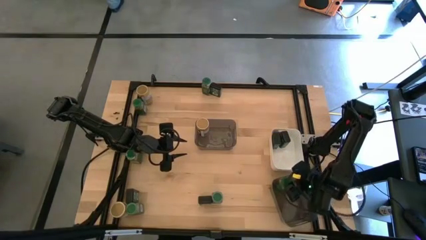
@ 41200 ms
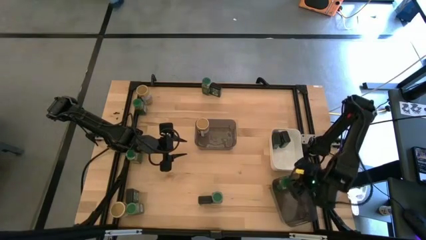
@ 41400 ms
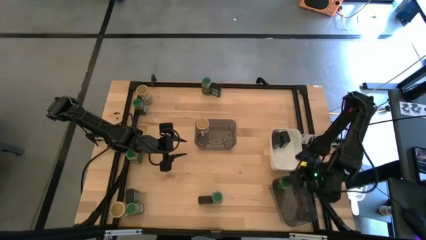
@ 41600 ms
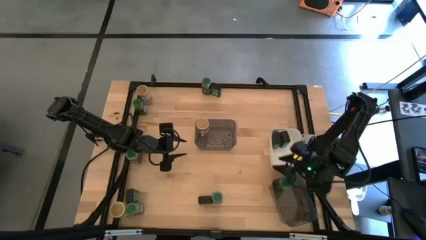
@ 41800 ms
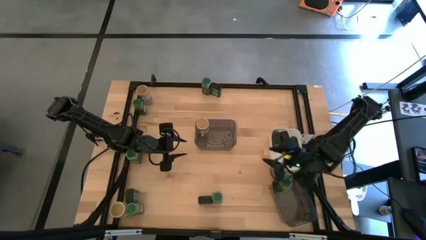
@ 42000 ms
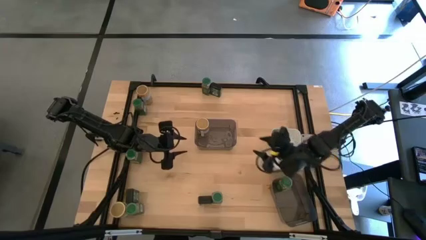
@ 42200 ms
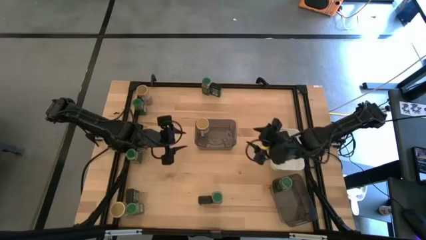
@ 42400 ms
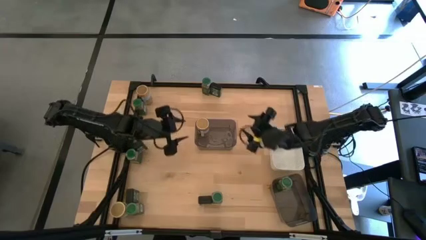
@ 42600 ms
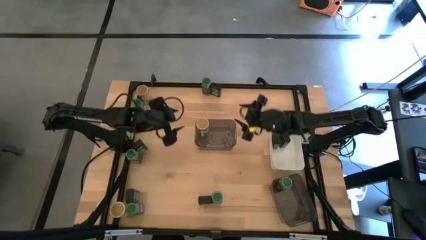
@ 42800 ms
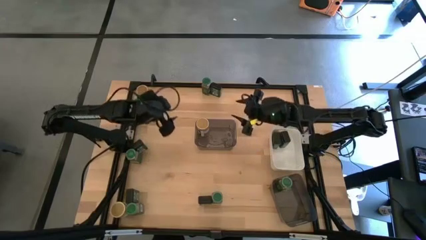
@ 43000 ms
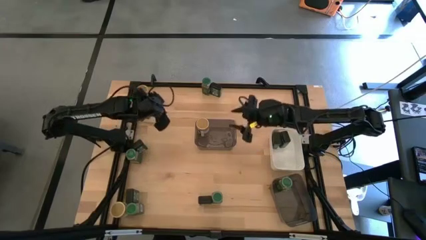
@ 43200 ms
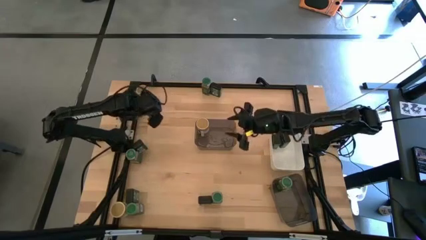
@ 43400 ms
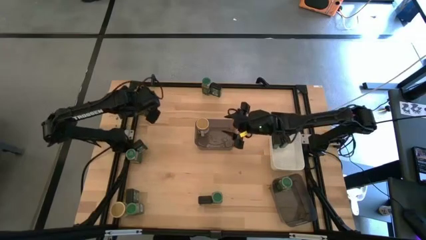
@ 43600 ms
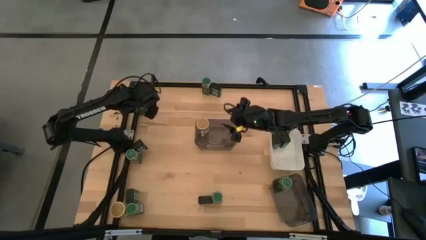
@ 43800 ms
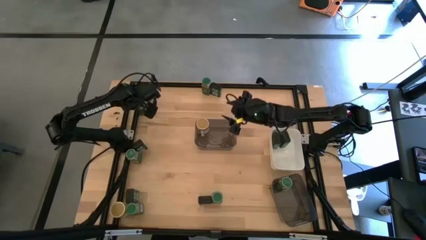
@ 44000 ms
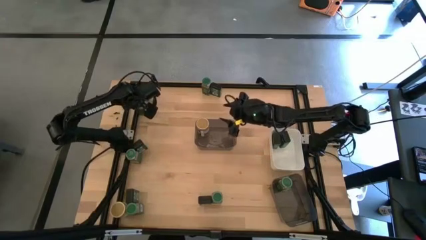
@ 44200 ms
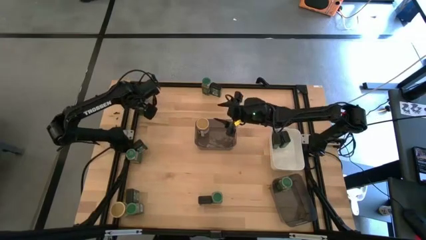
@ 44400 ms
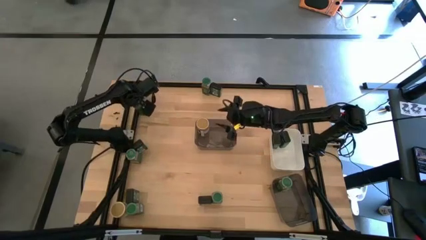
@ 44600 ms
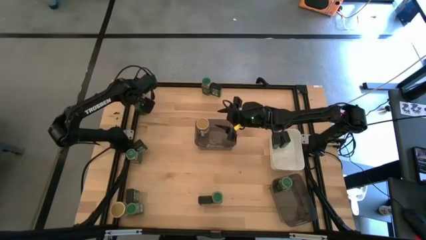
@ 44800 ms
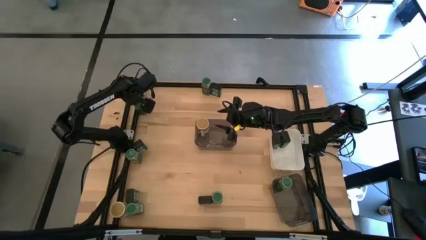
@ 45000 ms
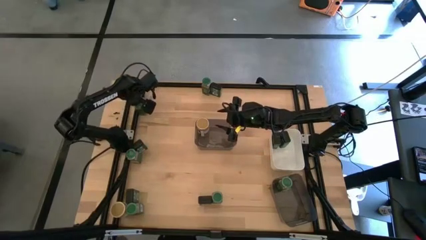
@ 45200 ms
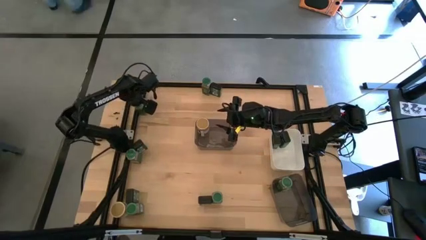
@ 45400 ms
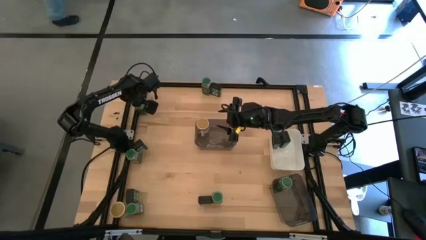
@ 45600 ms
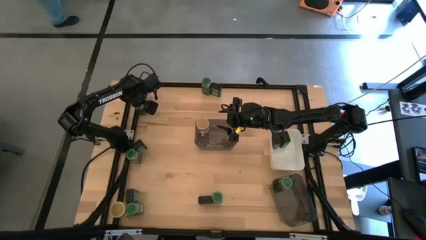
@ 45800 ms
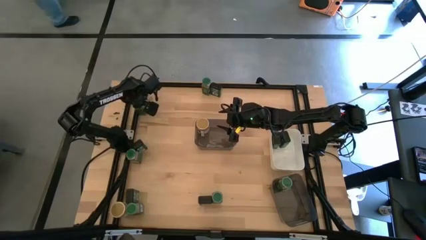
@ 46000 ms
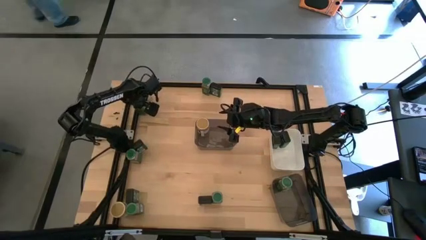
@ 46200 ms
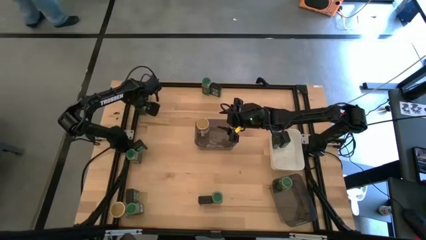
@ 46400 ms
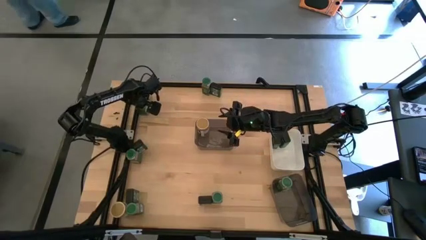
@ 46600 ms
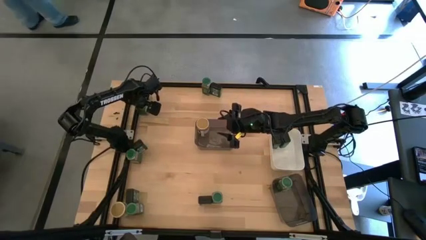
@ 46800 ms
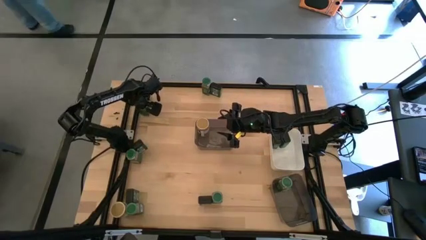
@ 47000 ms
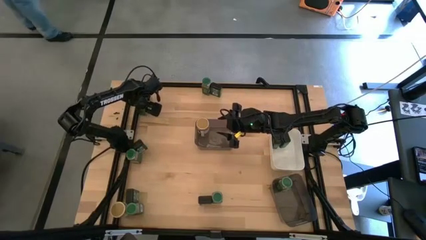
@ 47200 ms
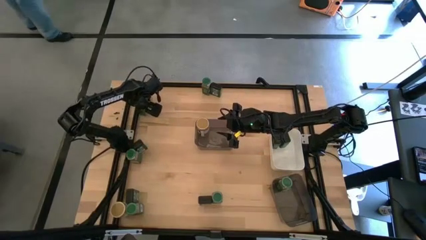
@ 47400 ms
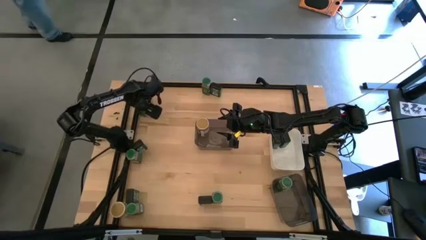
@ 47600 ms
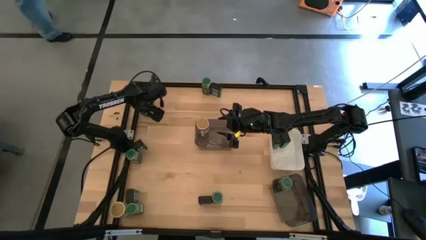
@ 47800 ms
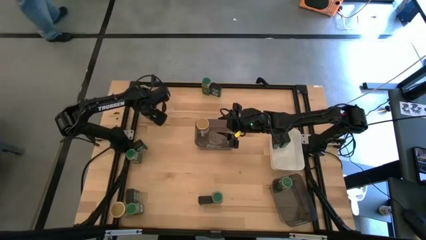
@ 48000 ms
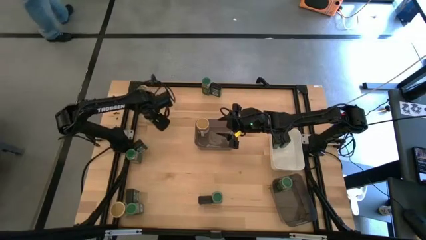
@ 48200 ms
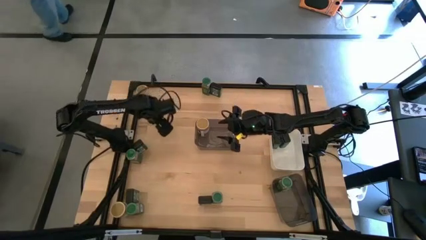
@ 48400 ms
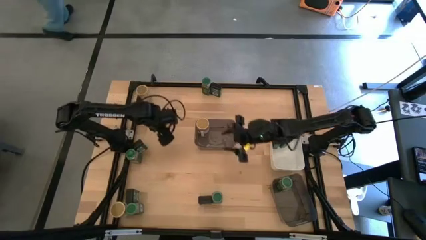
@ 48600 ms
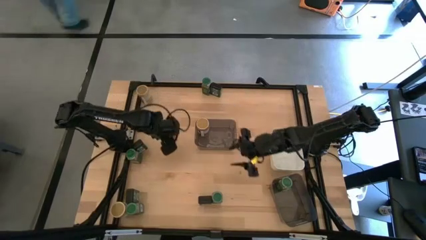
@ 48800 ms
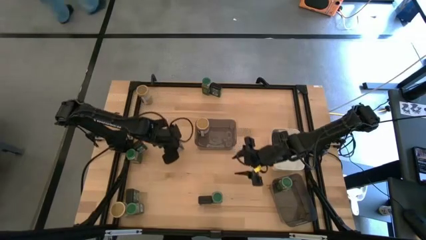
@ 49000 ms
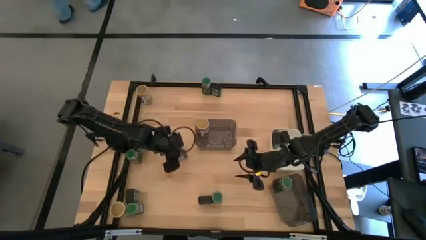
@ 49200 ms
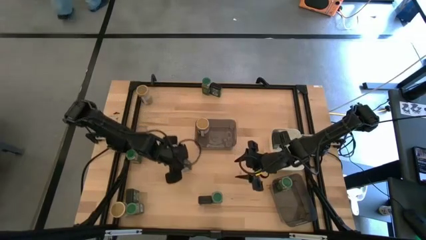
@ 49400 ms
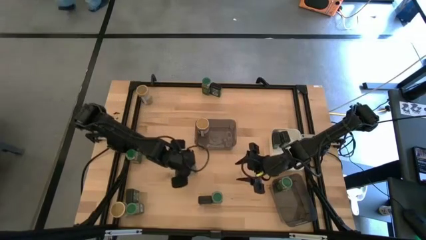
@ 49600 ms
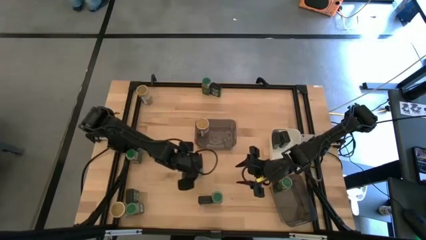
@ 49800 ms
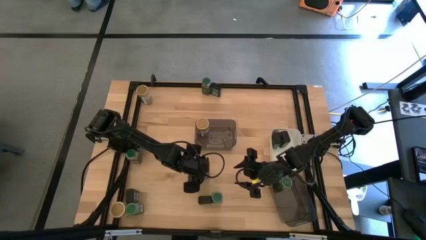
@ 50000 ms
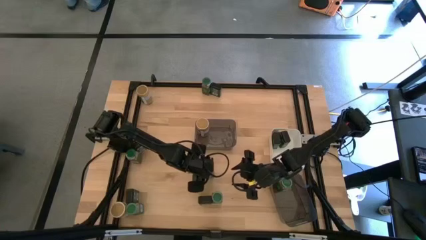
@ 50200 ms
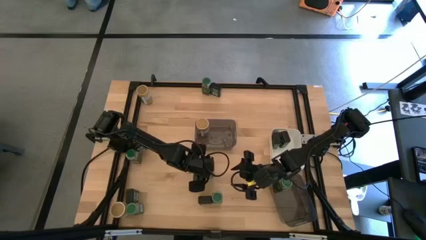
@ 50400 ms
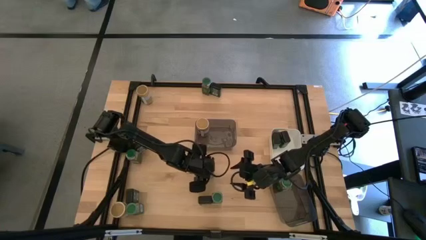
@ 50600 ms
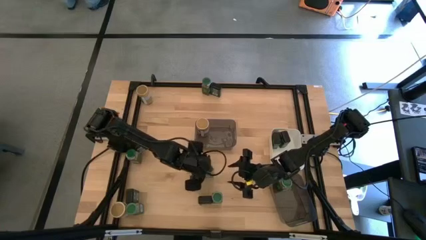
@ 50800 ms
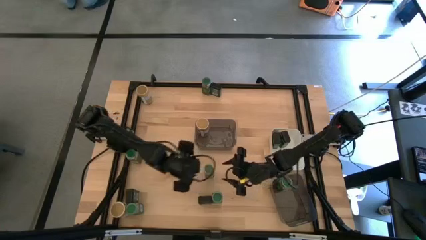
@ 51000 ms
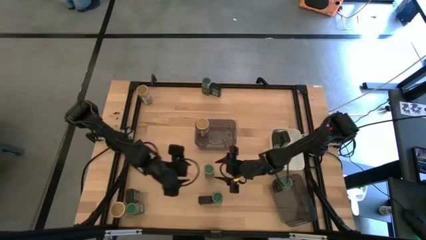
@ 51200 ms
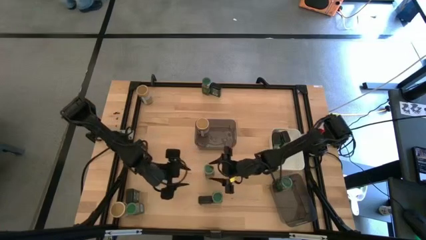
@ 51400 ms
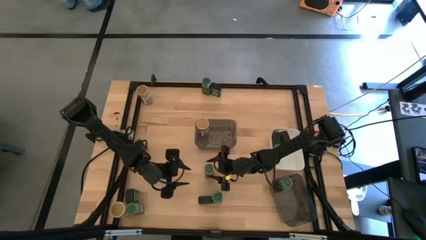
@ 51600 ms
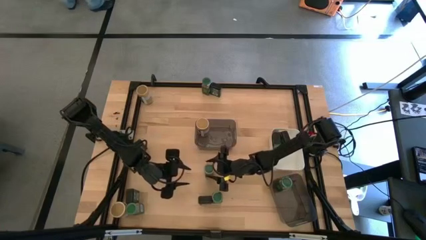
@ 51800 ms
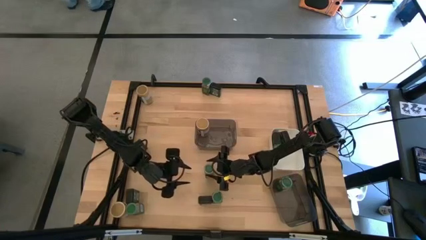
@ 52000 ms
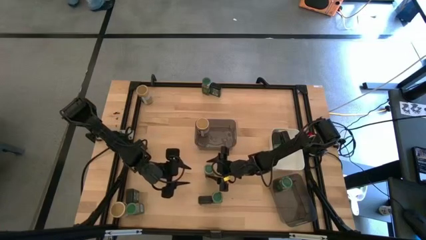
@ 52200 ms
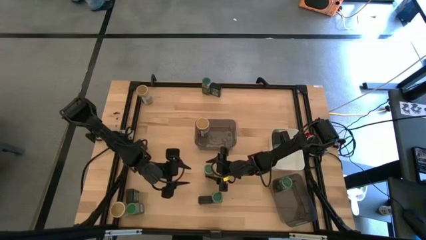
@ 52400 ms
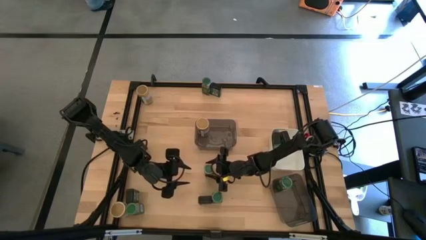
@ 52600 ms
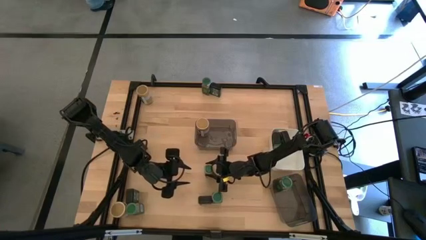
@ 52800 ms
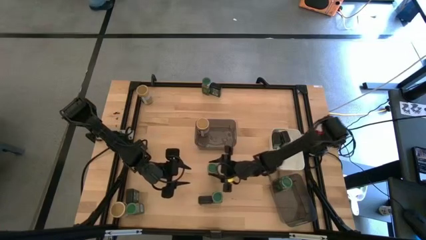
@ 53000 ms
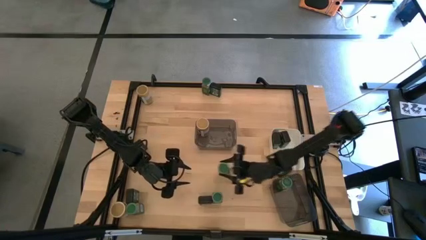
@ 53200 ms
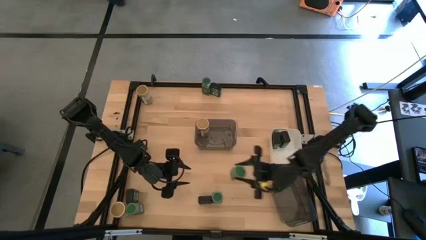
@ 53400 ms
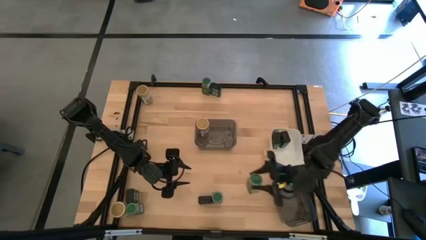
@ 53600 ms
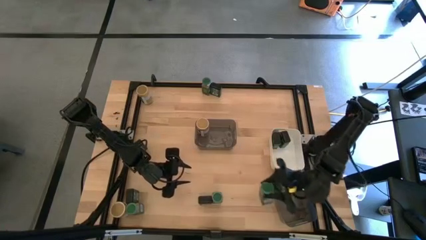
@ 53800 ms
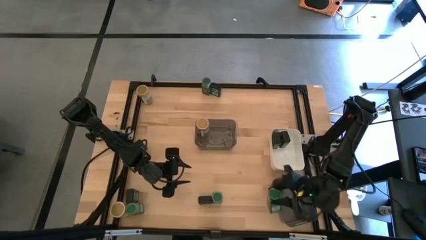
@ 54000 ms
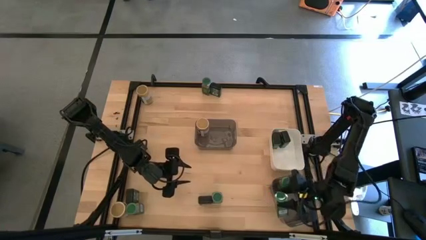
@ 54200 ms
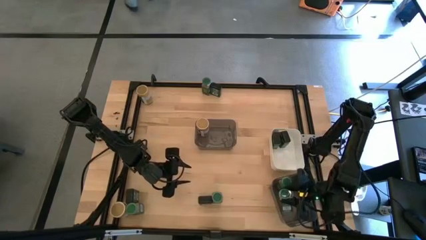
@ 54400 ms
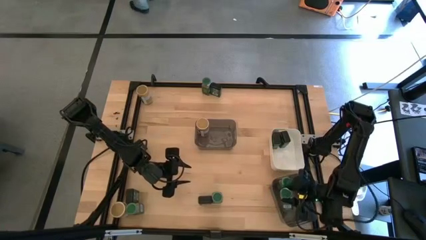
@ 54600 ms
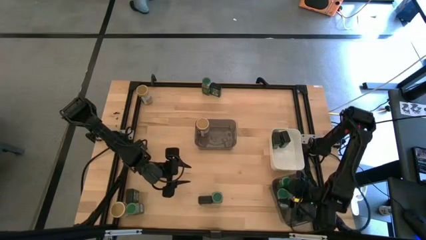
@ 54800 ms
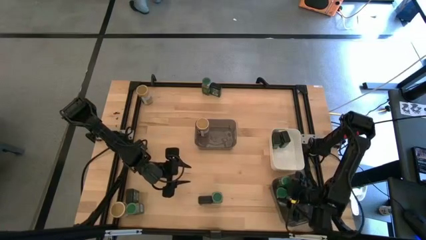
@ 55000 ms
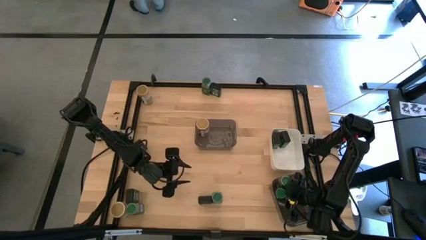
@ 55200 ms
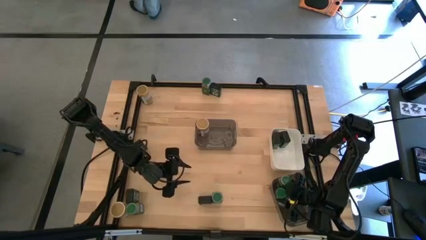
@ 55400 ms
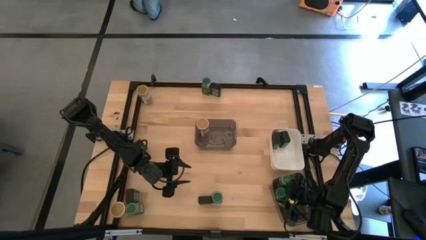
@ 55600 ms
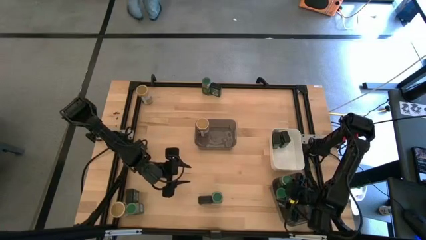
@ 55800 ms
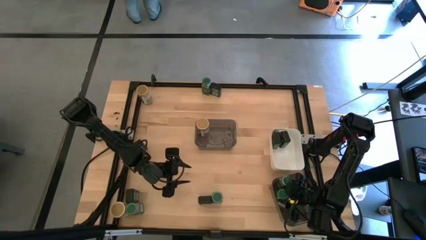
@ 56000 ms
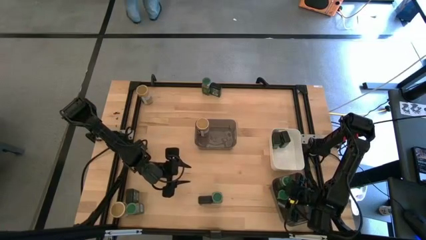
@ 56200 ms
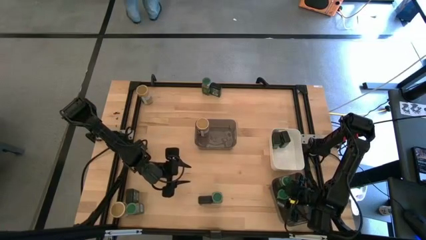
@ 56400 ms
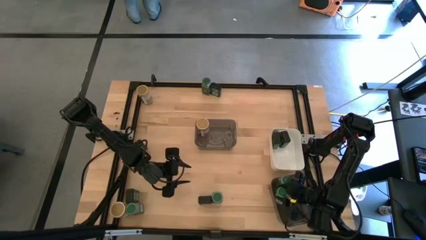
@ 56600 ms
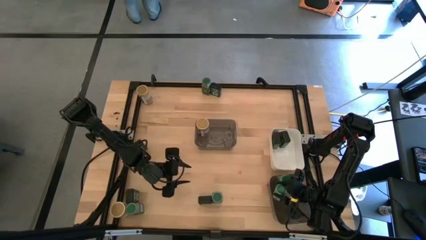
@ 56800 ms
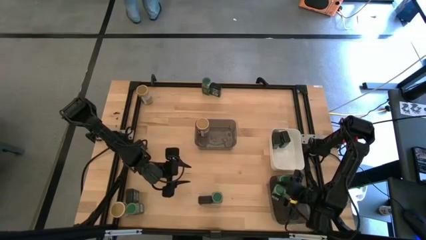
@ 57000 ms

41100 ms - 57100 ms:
Task: Sort spices by type
Put the top left green seasoning bottle into the bottom black bin
